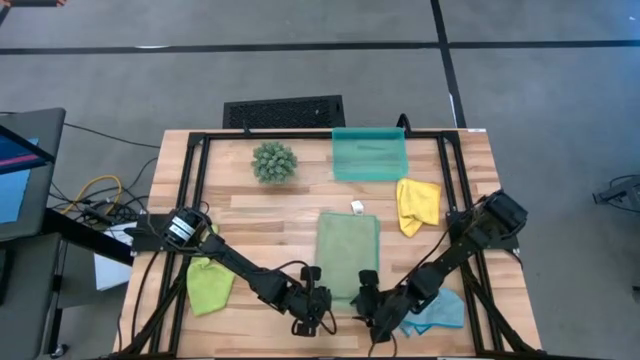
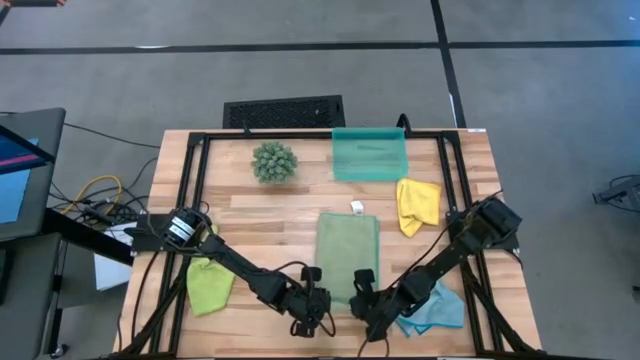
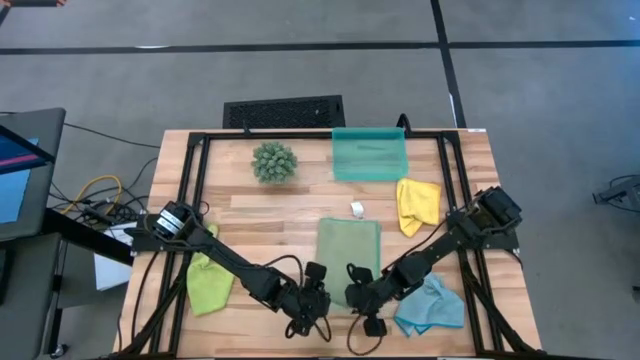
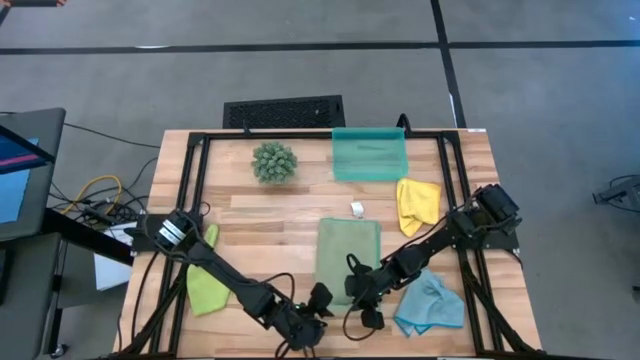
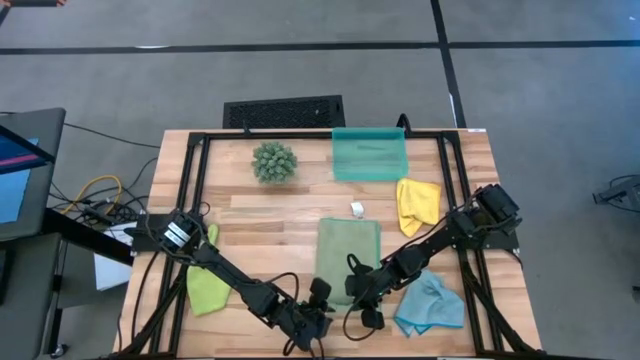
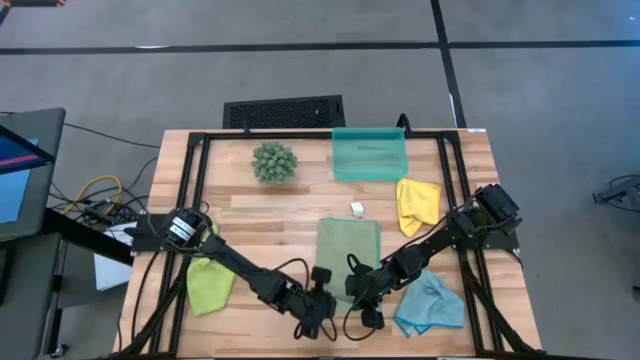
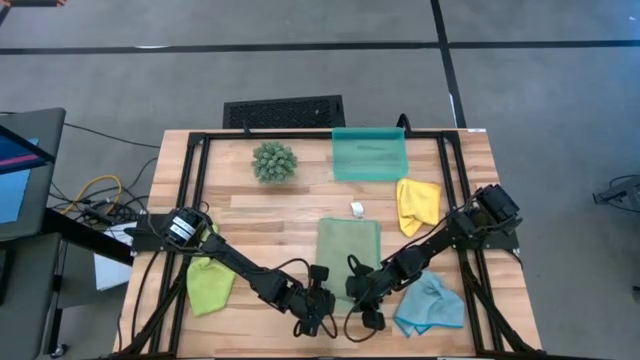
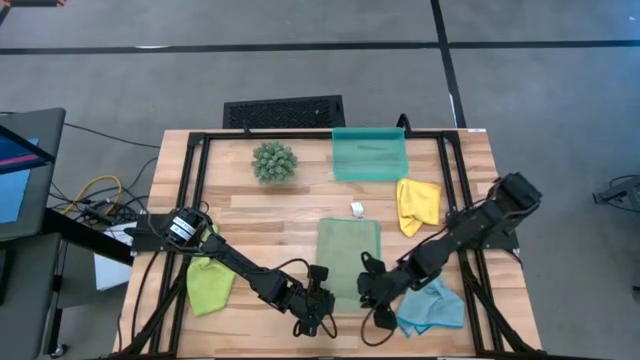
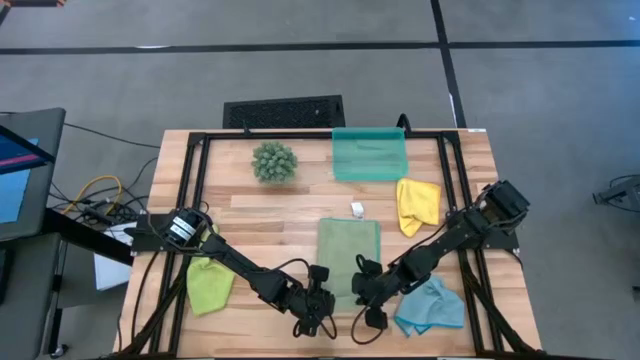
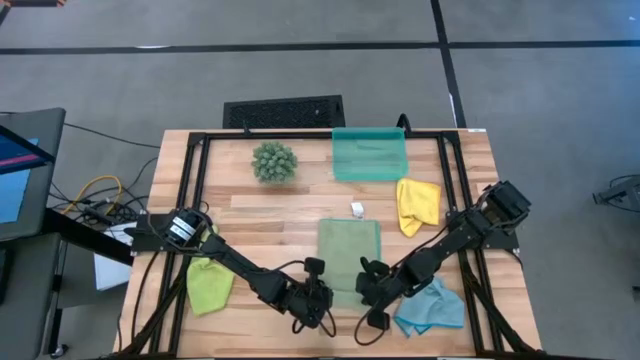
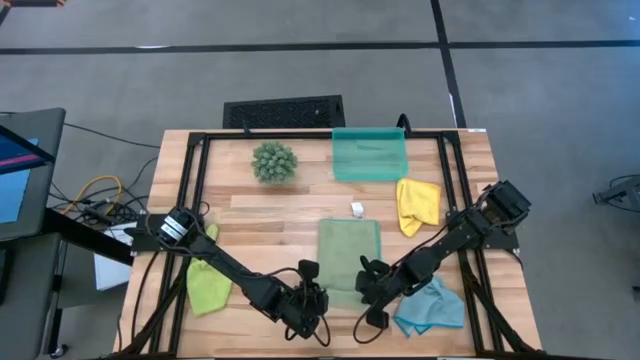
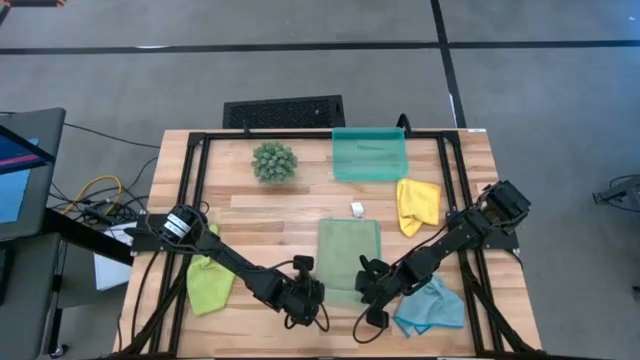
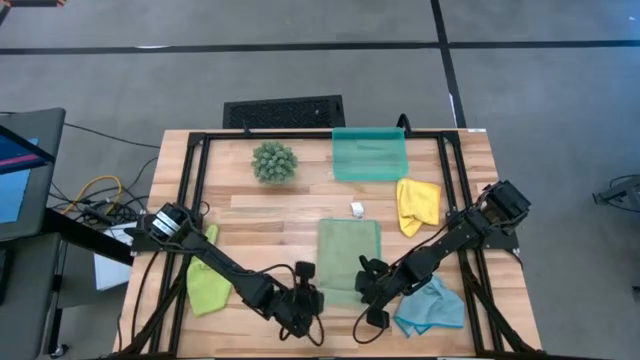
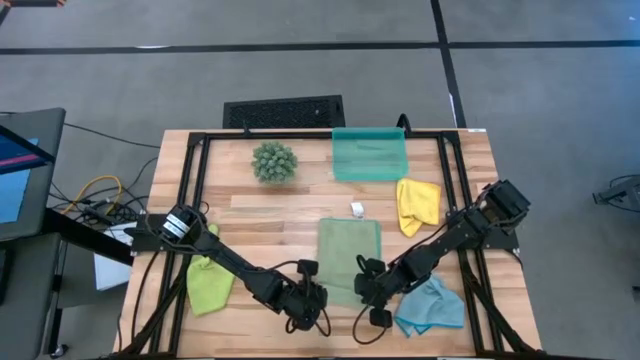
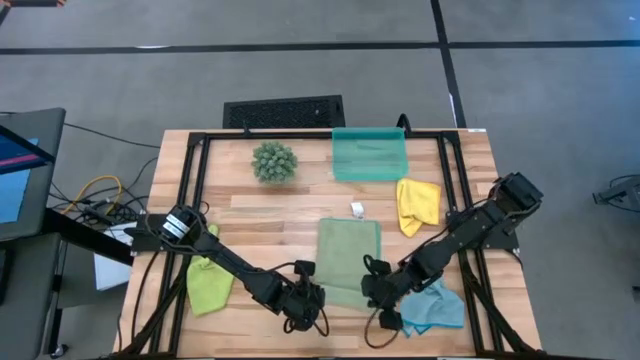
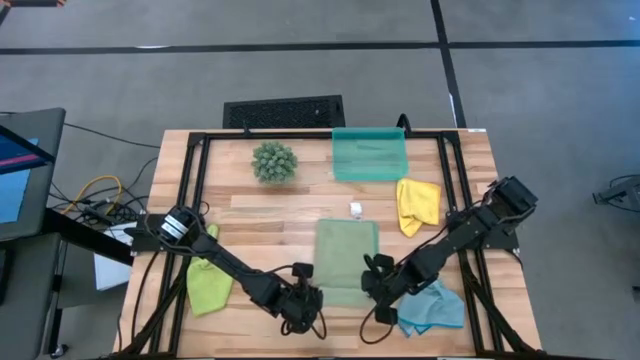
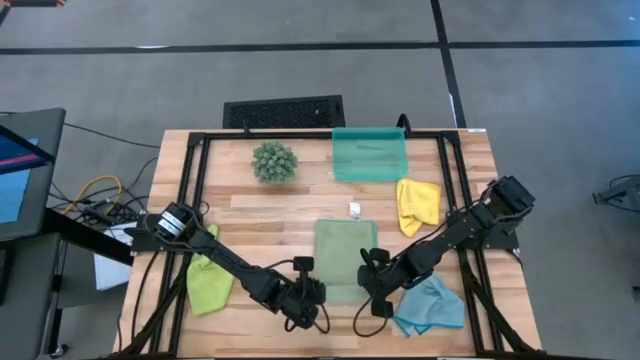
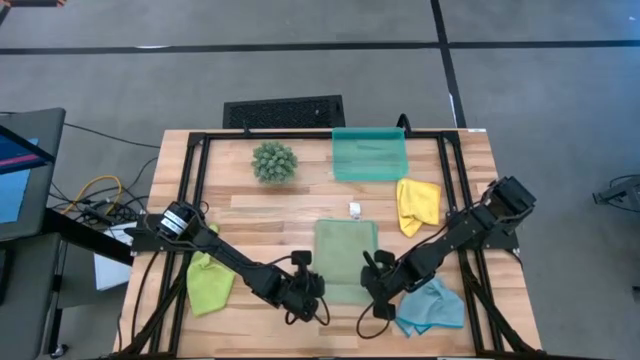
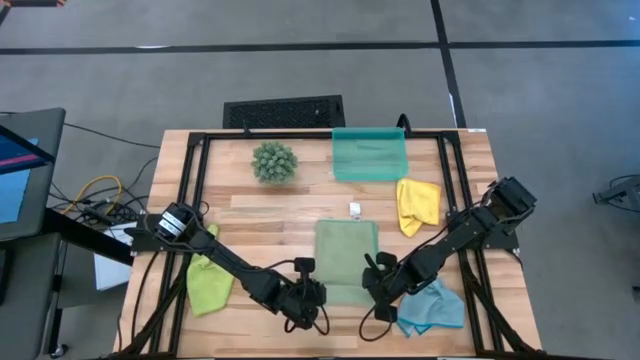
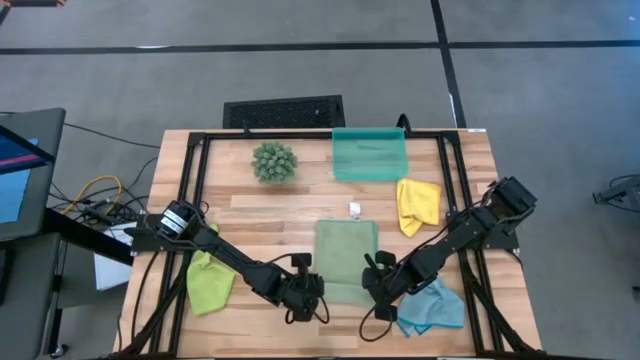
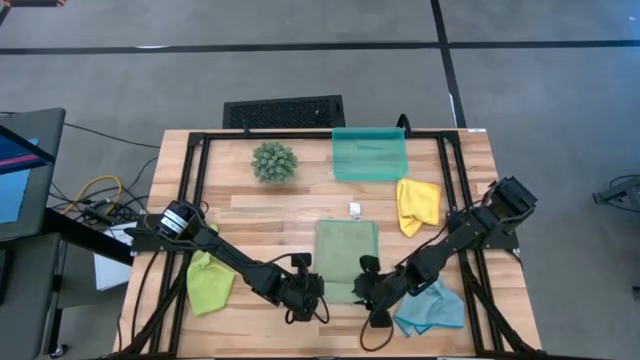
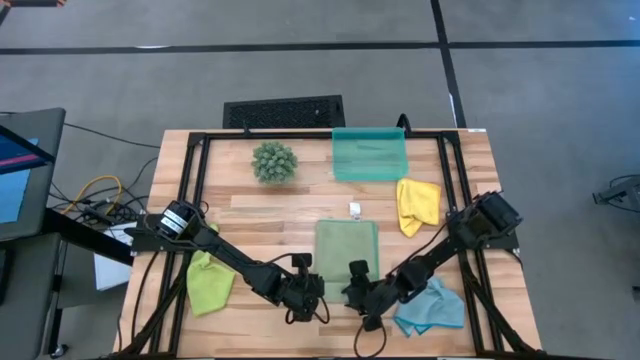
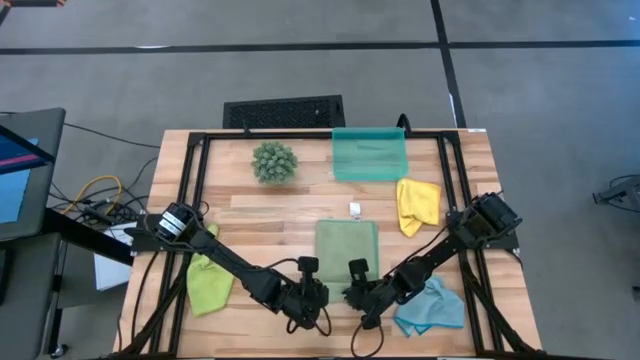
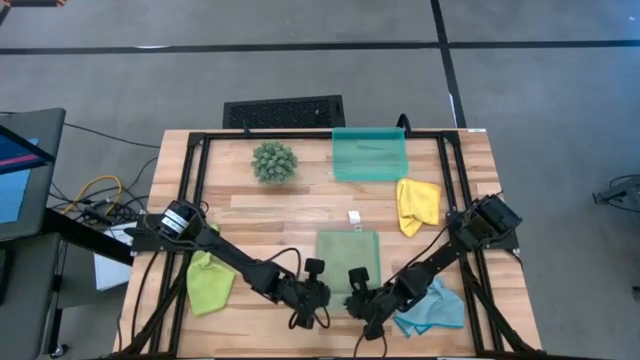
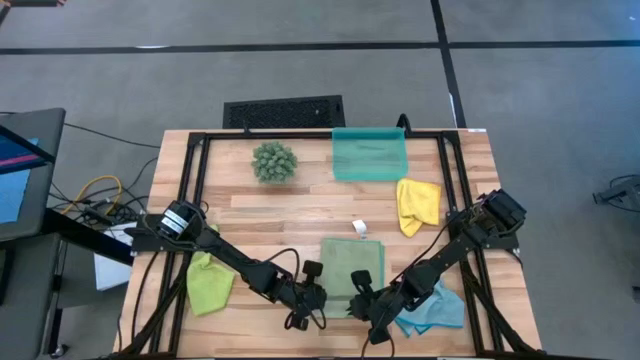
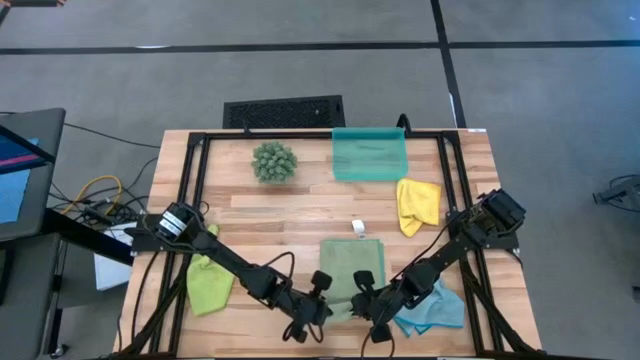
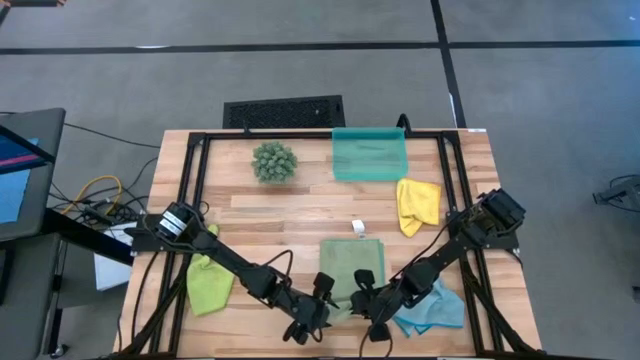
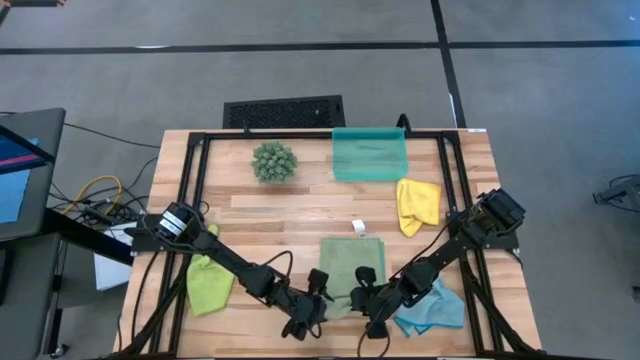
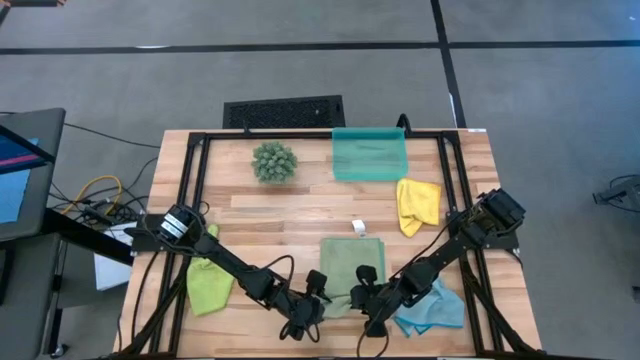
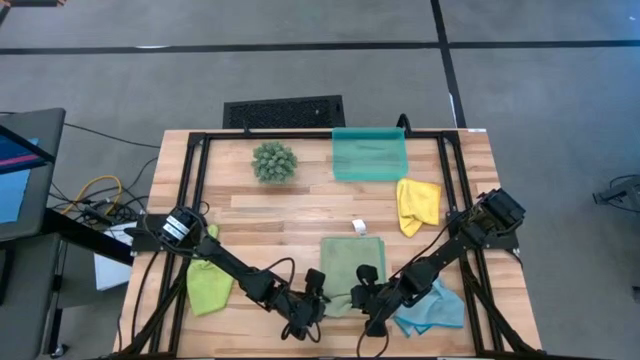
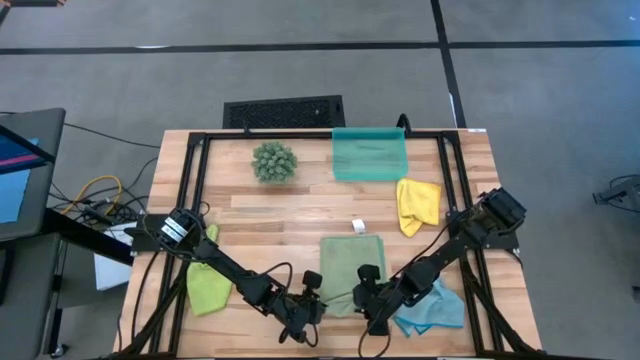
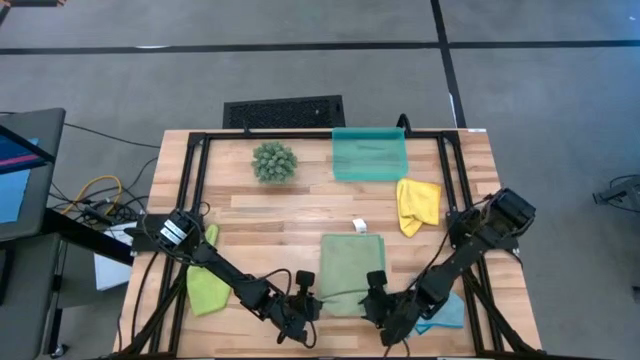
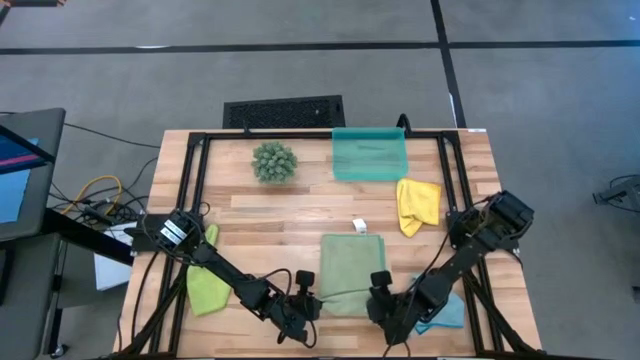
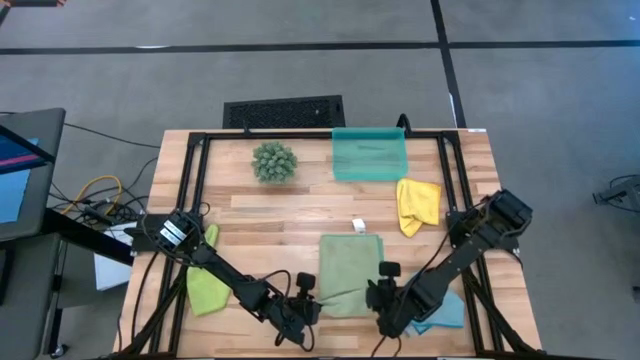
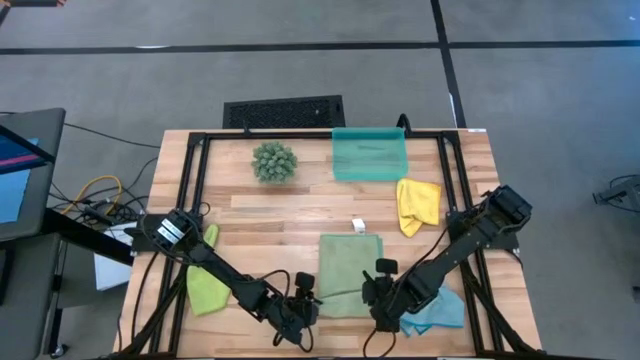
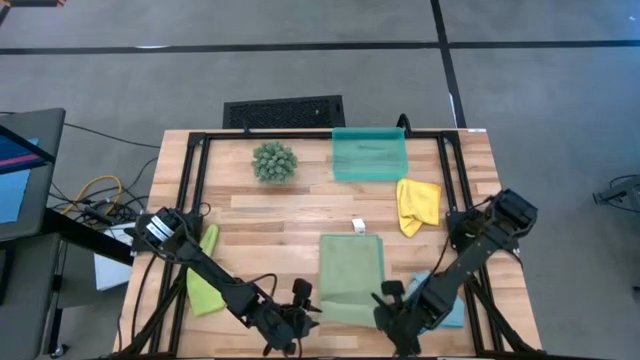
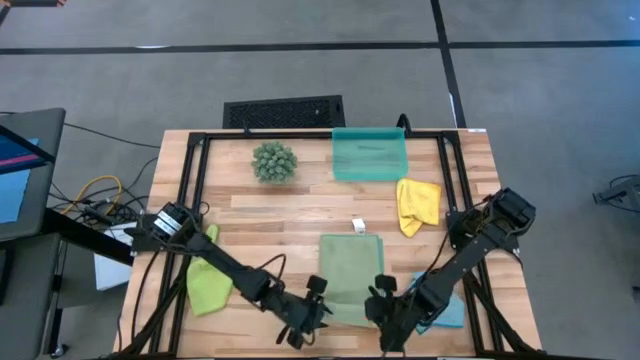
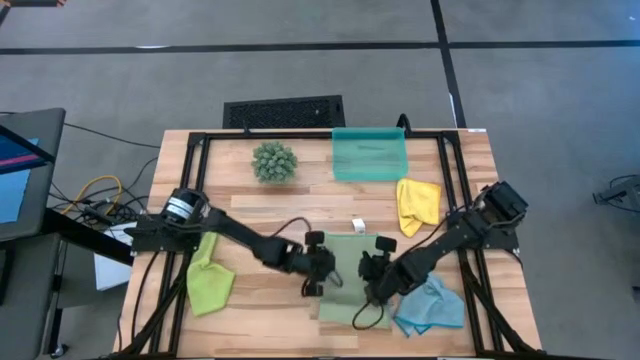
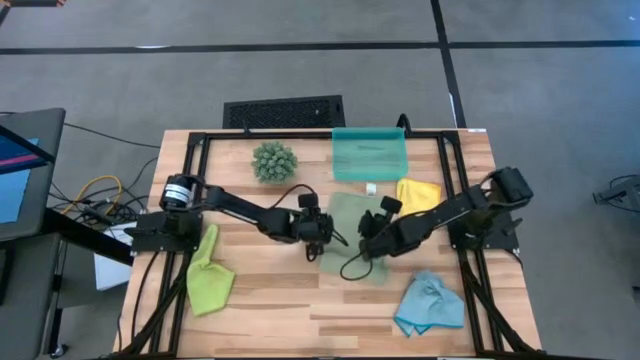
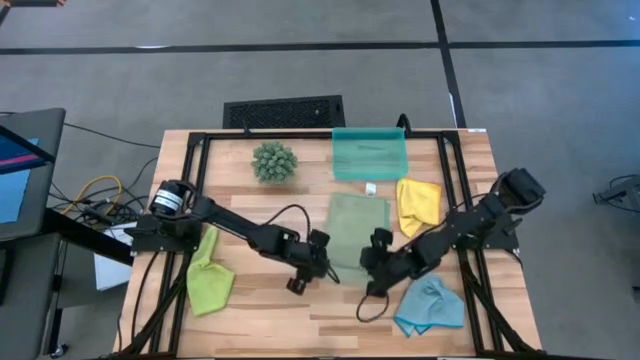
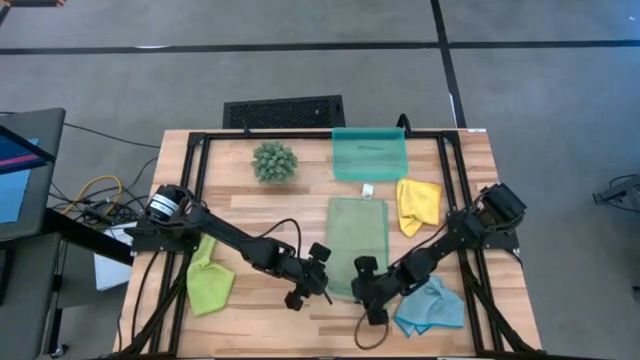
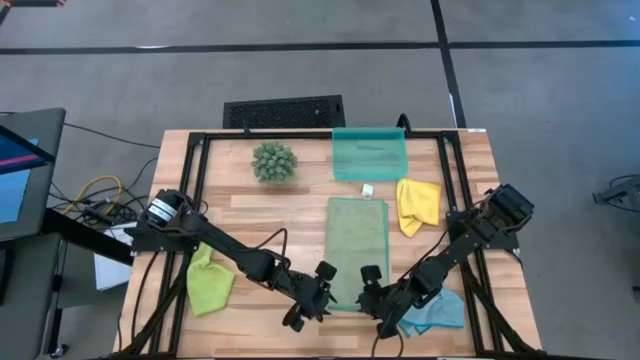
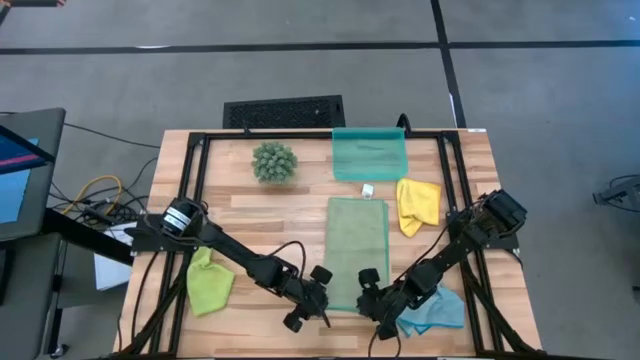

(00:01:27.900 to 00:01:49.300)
Task: Roll microfiber towels into tight, uniform cylinder then place into a basket
Roll the dark green microfiber cloth
